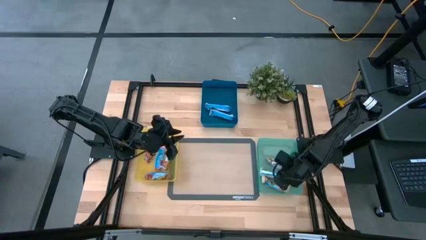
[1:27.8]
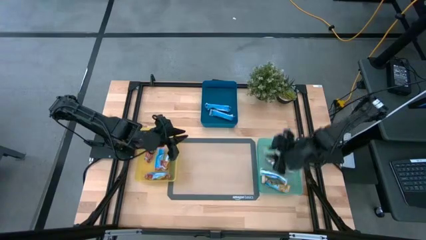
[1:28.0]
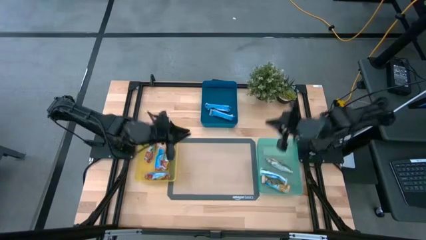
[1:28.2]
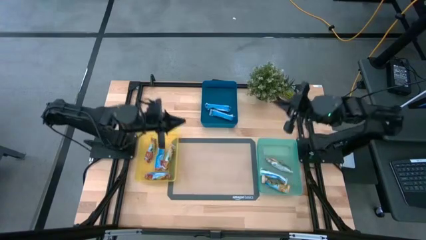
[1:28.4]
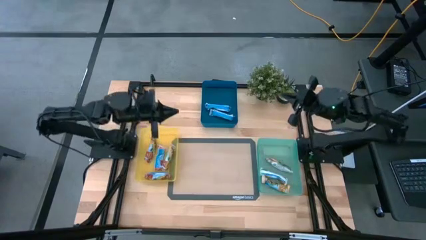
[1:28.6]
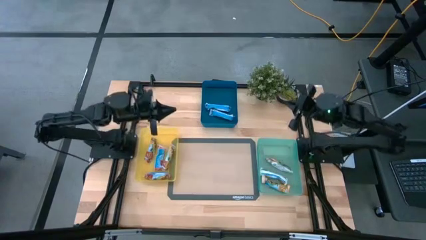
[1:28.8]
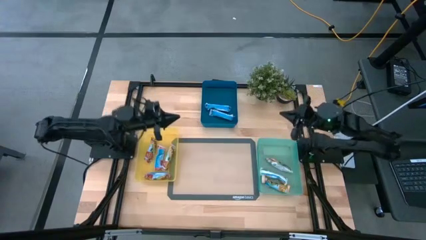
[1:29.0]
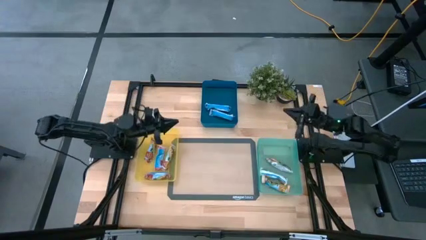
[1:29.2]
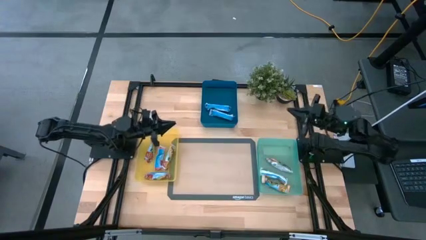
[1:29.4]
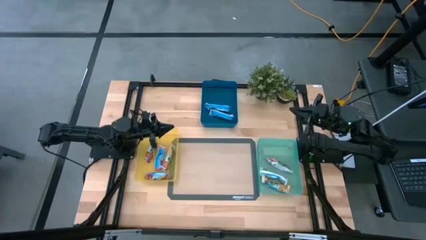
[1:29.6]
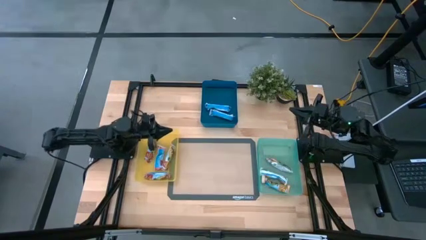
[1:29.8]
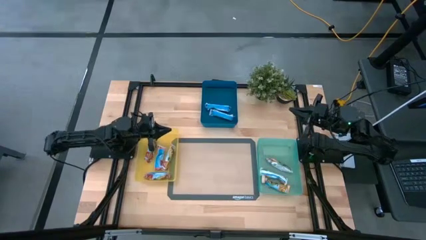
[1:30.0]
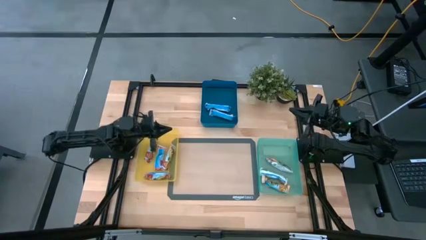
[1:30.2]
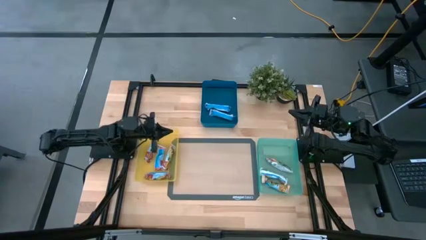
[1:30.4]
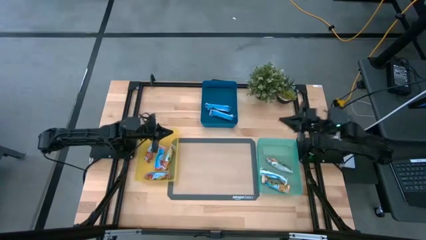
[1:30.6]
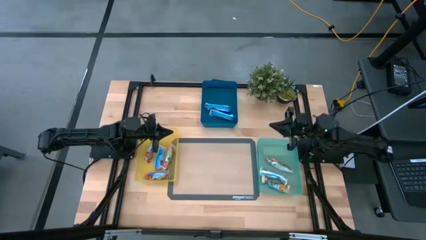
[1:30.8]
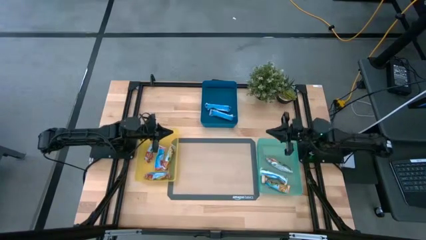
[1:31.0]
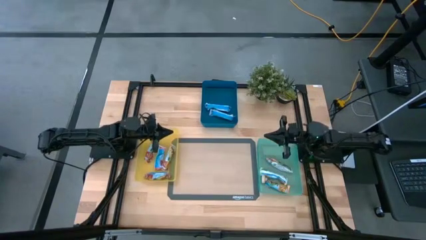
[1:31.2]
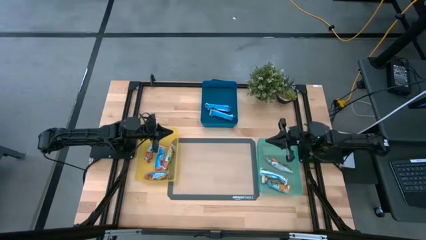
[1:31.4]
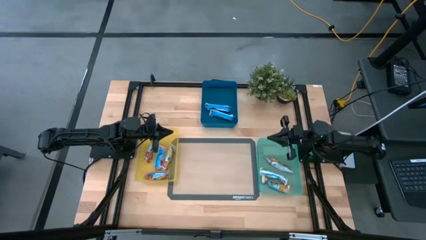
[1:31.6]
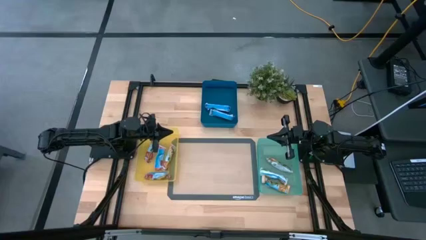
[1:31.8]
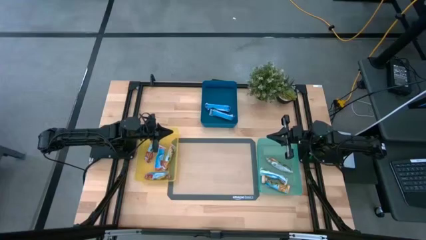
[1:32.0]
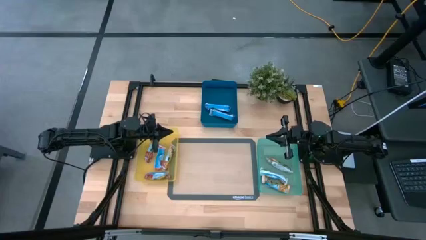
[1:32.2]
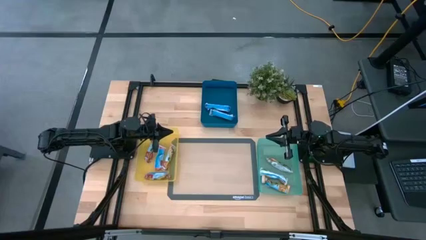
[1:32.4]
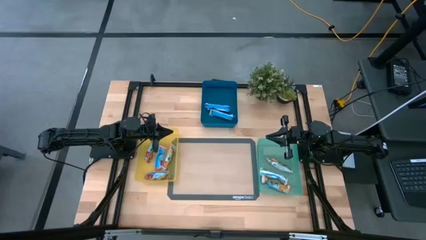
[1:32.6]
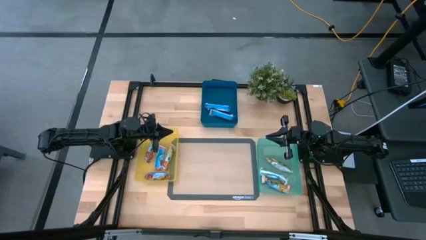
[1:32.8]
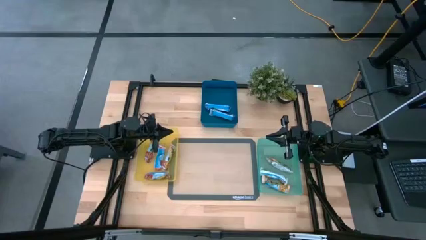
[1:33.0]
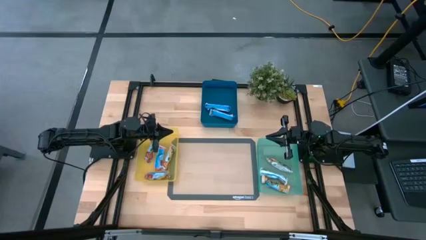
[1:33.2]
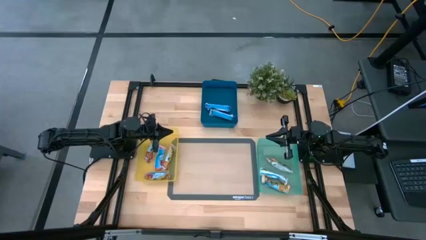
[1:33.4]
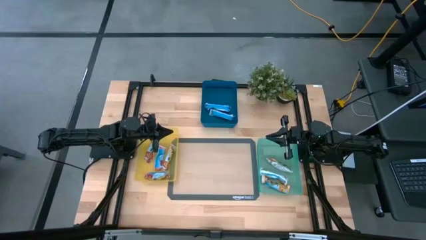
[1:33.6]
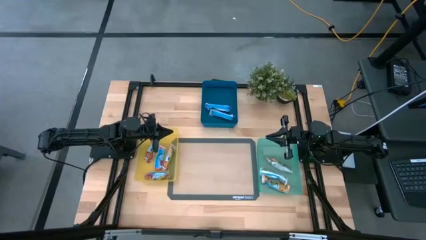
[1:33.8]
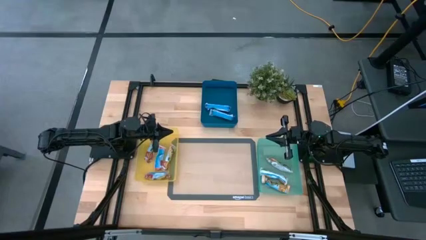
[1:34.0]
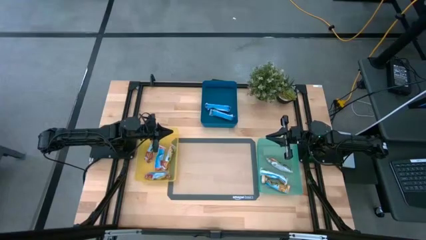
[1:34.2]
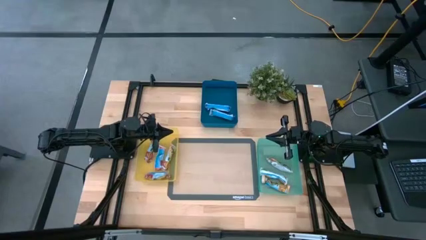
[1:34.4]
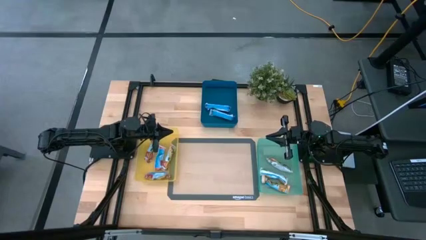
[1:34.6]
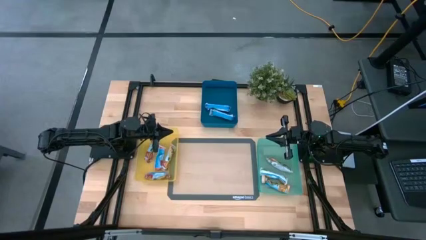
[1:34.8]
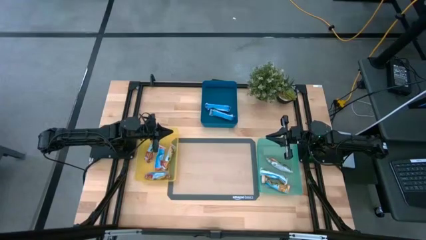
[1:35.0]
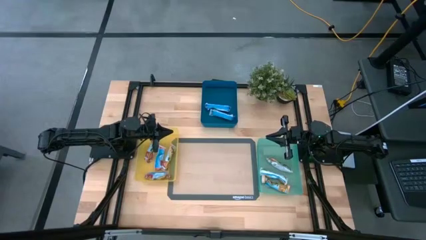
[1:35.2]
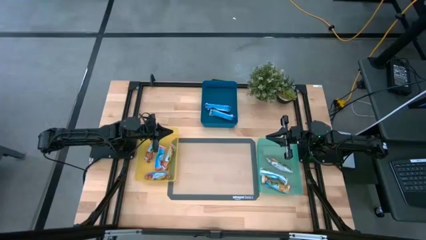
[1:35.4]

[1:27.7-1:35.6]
Task: Pick and place Granola Bars by type
Return to Home Position

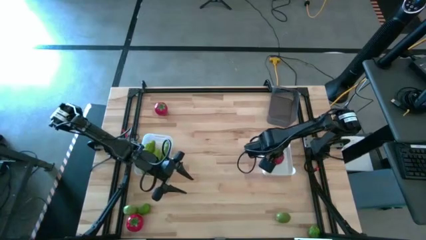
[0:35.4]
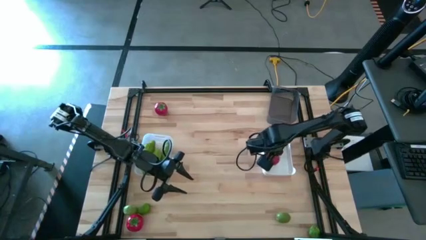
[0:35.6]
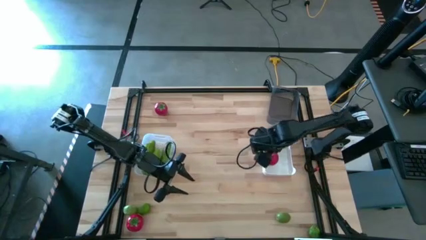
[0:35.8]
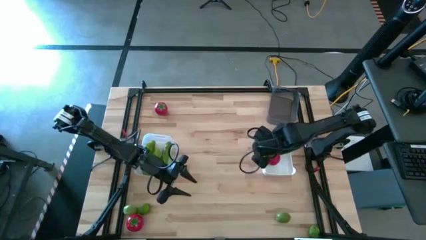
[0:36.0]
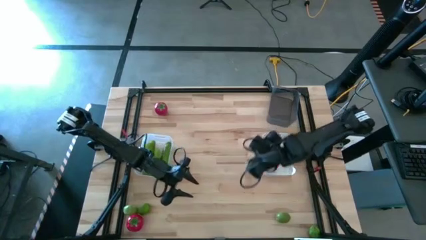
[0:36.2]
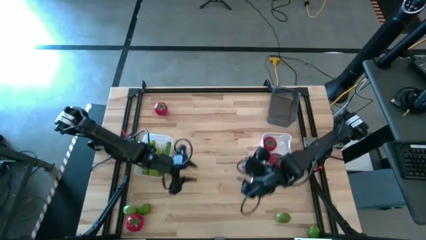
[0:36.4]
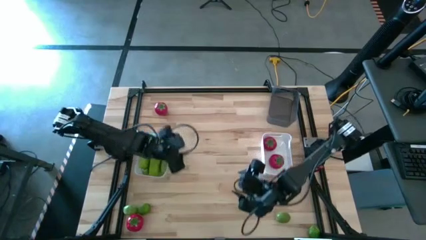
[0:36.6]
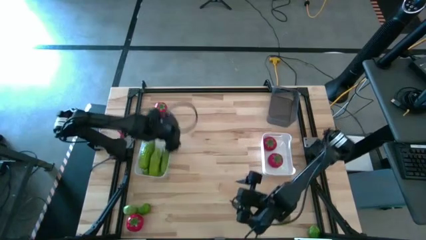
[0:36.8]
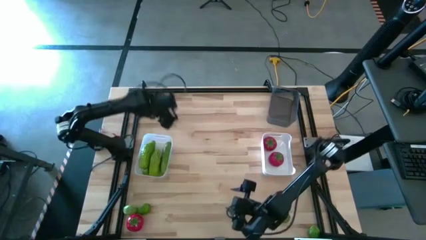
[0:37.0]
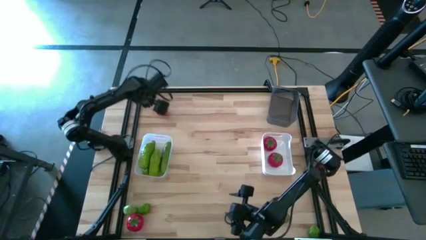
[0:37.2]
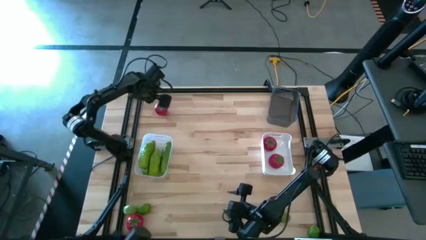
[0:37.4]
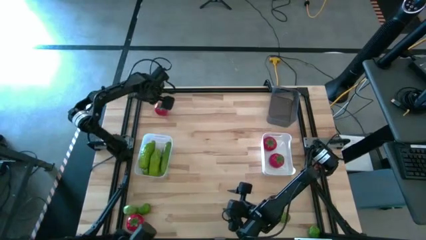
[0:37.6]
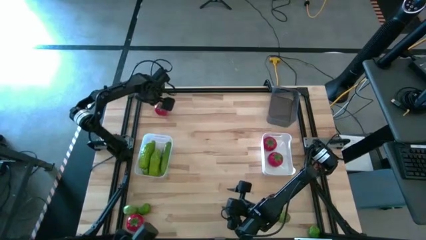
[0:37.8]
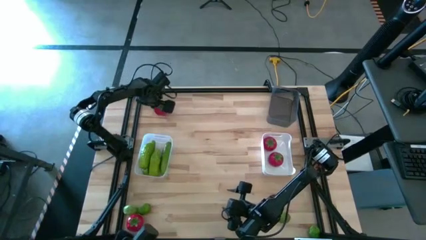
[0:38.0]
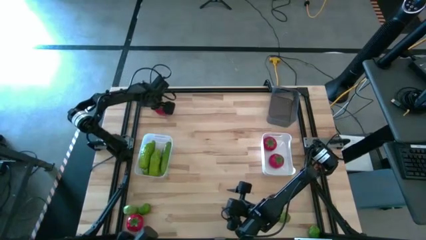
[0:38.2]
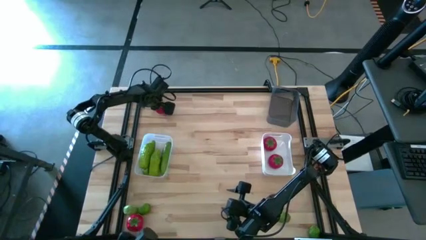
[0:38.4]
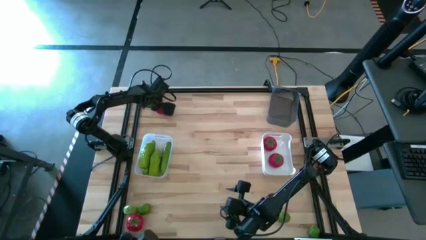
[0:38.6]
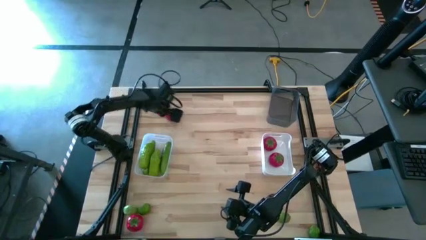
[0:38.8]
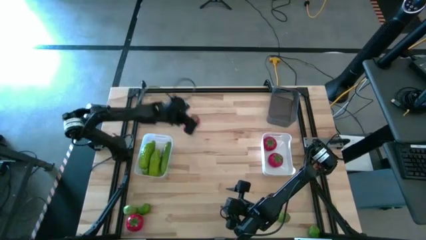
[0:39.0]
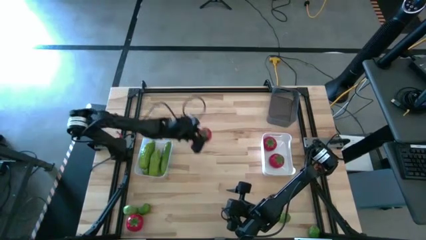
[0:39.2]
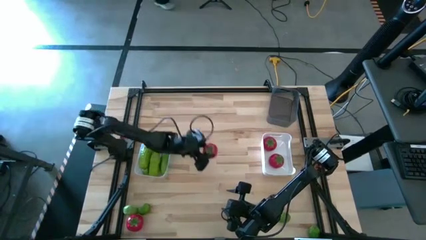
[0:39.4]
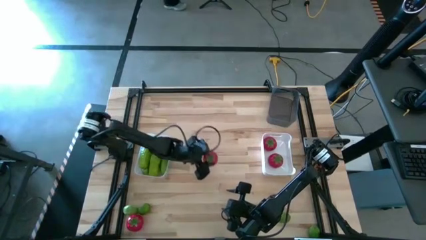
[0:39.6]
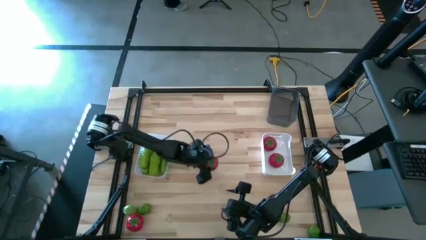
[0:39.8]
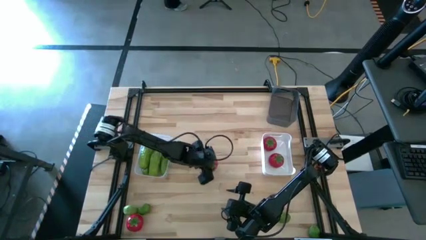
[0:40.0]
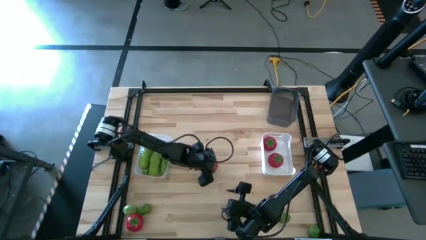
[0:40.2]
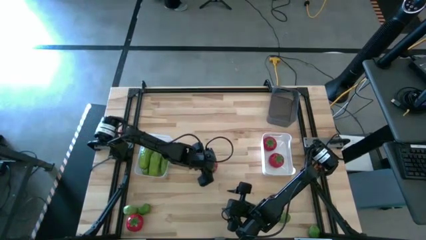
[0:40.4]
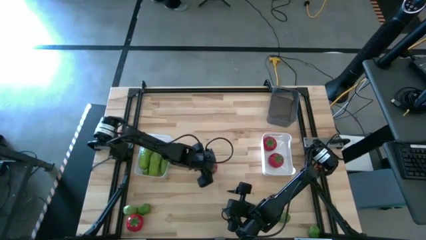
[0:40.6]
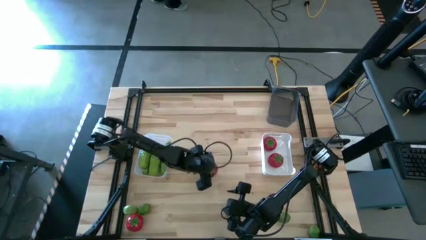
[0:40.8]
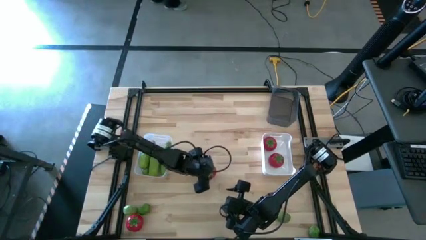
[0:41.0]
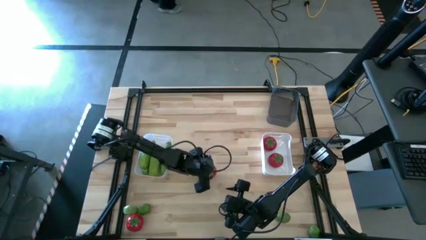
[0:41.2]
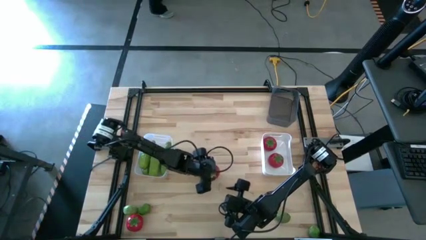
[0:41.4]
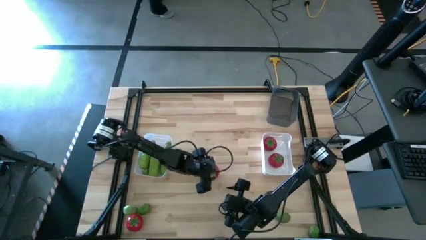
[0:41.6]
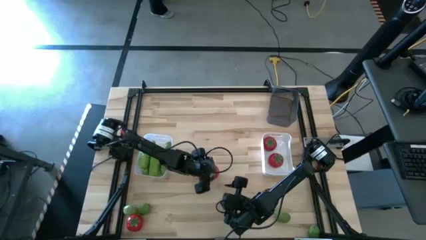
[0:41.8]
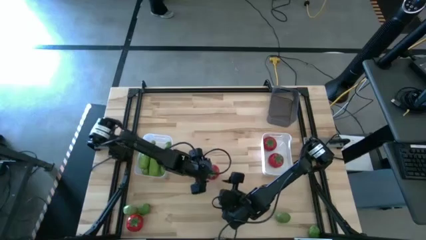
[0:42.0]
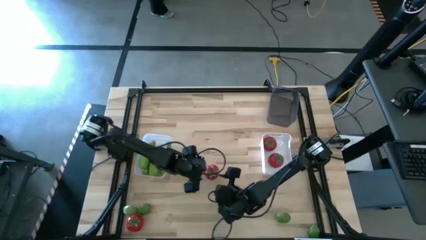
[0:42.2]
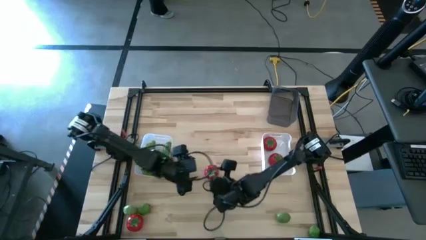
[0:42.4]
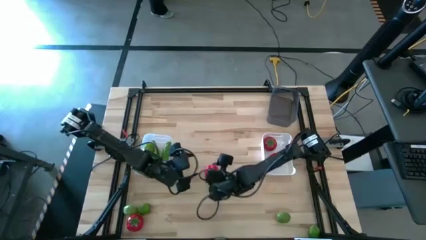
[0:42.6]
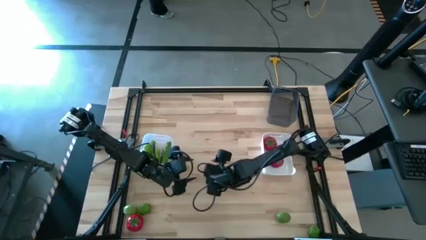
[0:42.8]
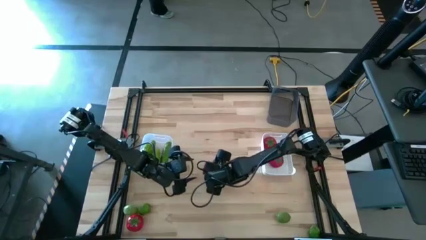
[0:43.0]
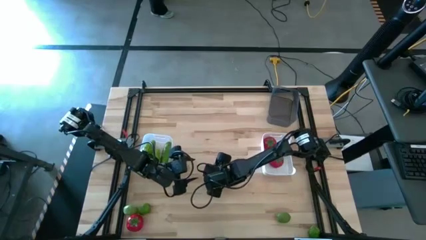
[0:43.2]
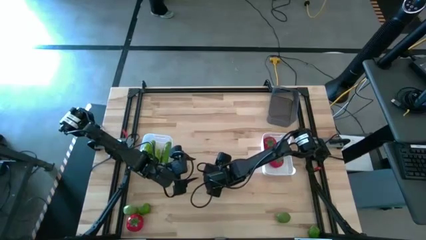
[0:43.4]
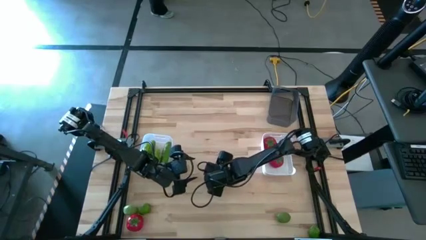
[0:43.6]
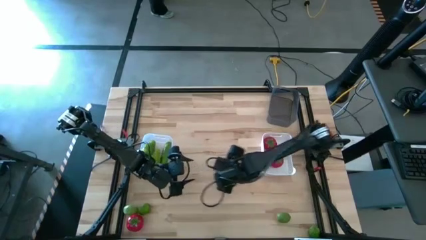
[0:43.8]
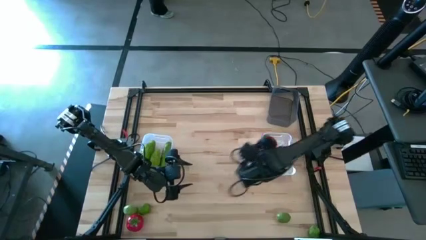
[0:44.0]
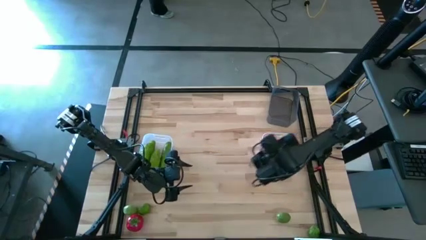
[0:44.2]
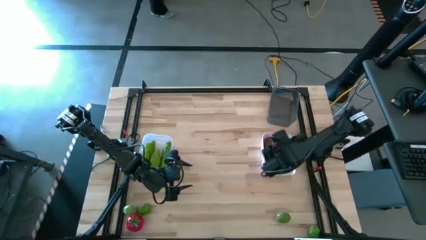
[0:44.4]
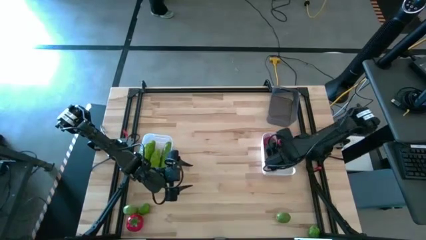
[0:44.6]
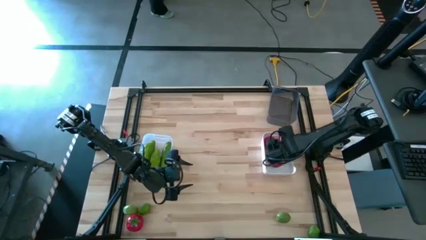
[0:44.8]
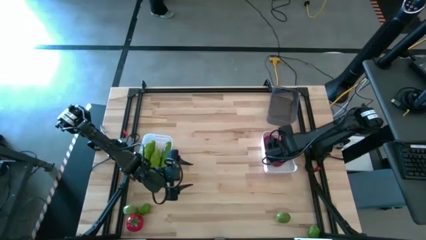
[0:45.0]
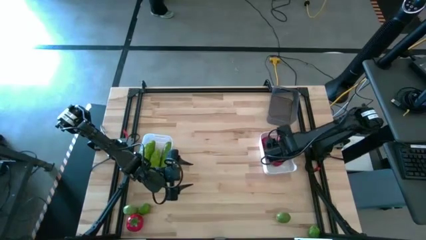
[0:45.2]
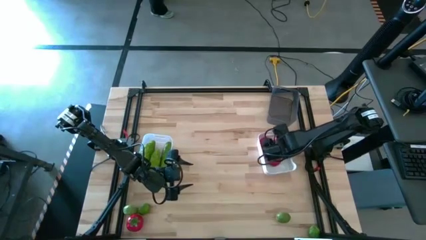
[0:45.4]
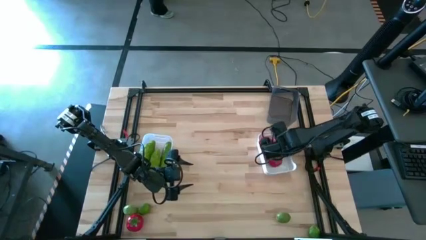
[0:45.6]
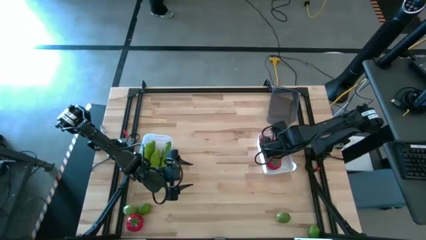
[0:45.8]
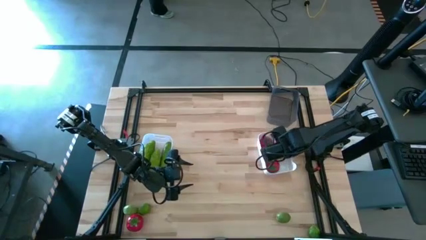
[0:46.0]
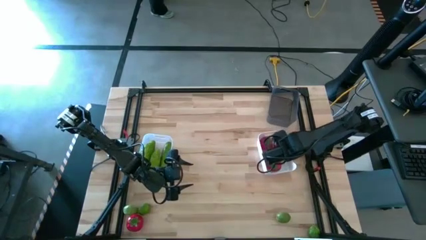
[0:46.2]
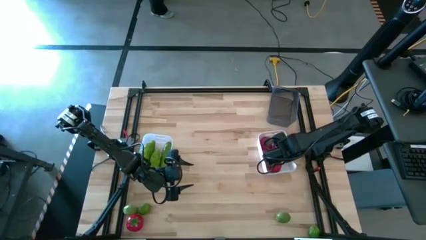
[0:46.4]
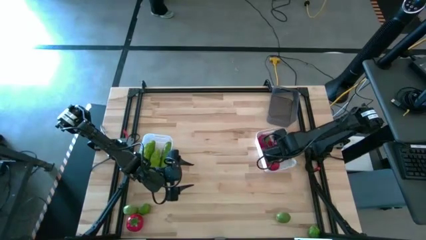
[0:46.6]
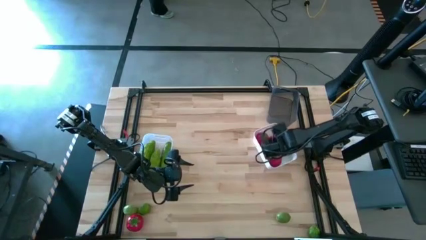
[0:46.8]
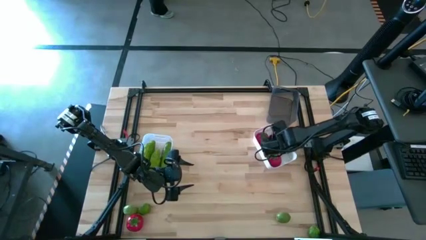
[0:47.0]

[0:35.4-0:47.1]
Task: Sort produce into baskets
Put the tomato into the white bin
